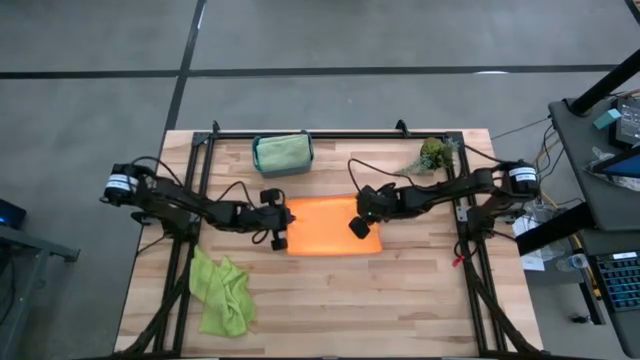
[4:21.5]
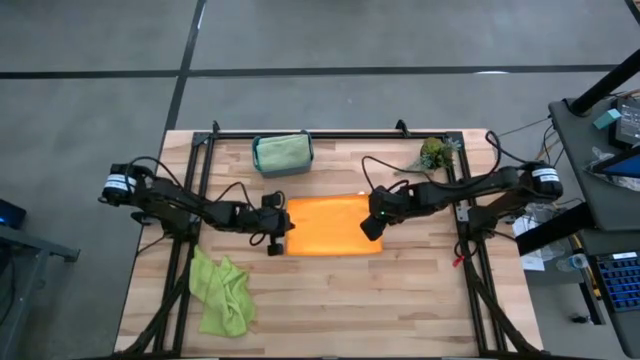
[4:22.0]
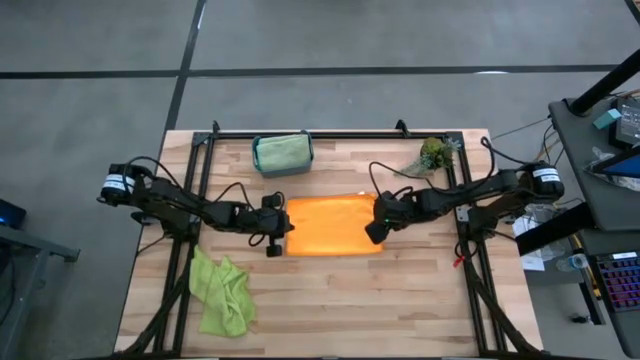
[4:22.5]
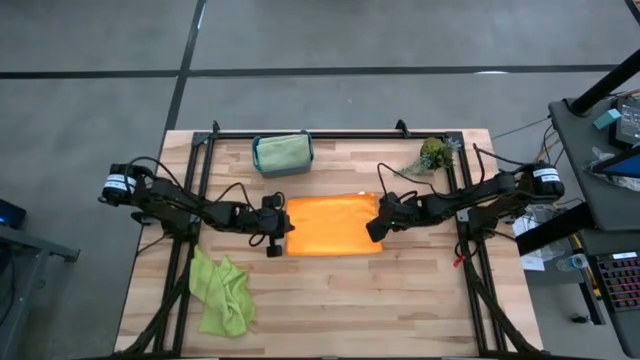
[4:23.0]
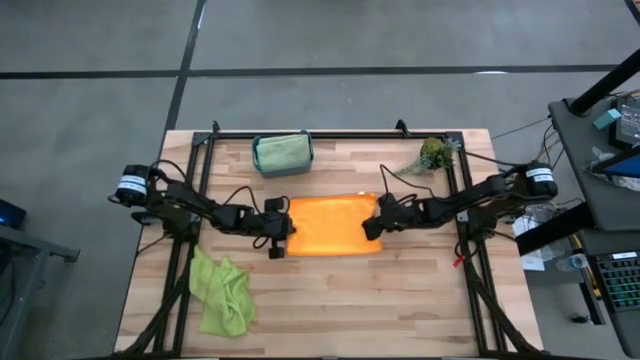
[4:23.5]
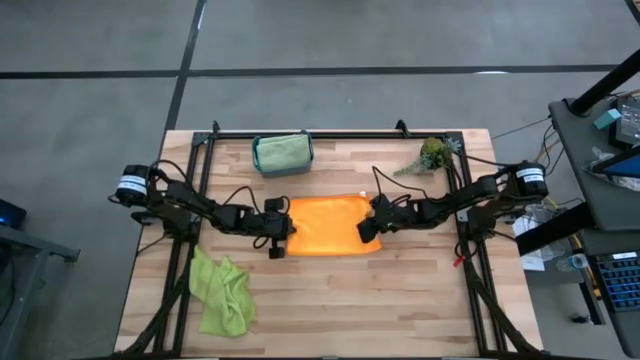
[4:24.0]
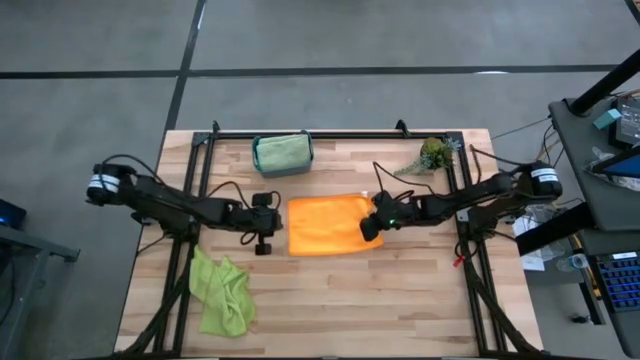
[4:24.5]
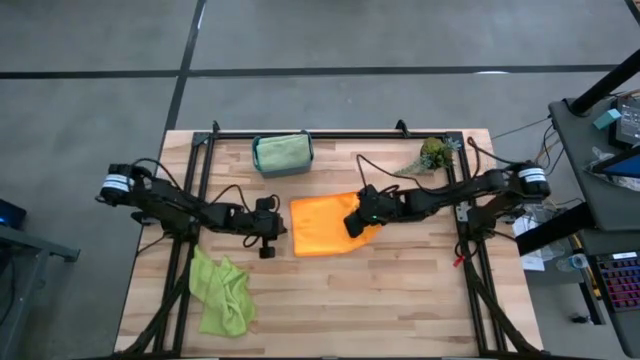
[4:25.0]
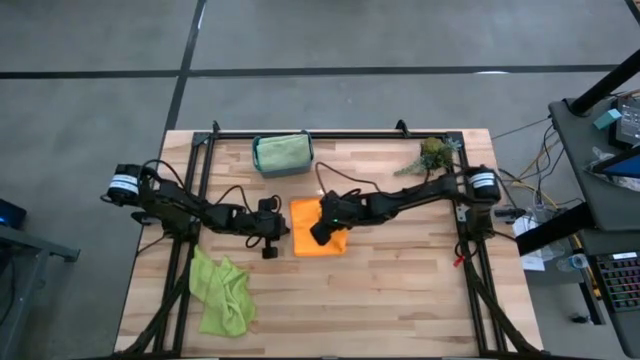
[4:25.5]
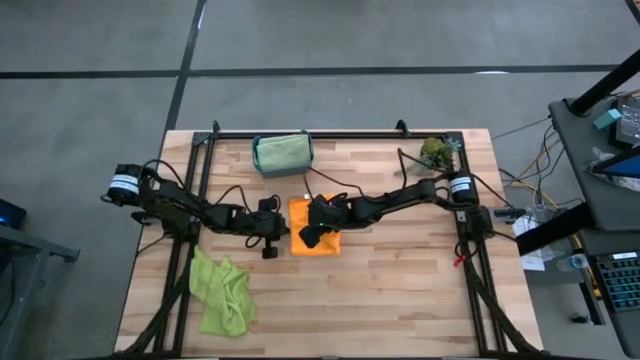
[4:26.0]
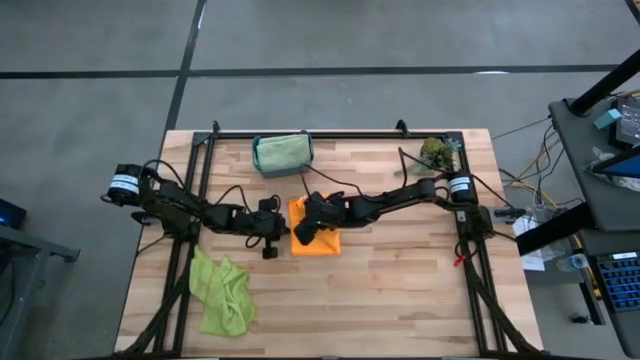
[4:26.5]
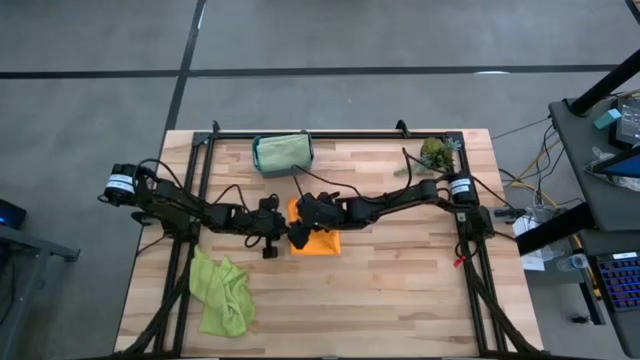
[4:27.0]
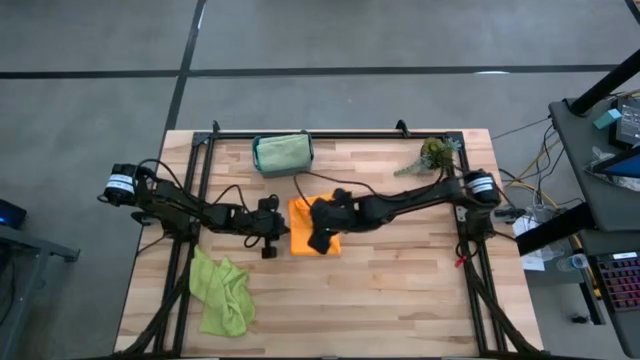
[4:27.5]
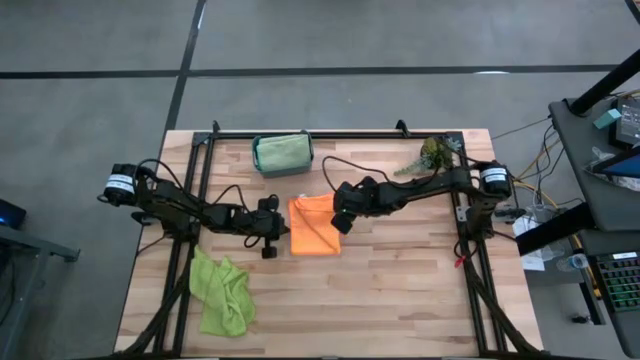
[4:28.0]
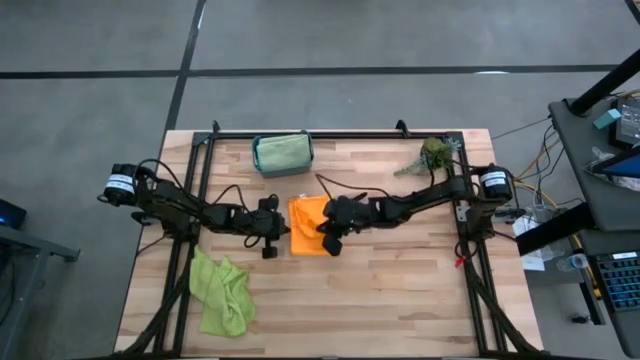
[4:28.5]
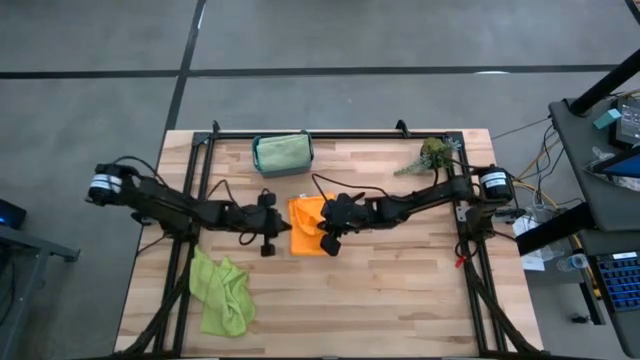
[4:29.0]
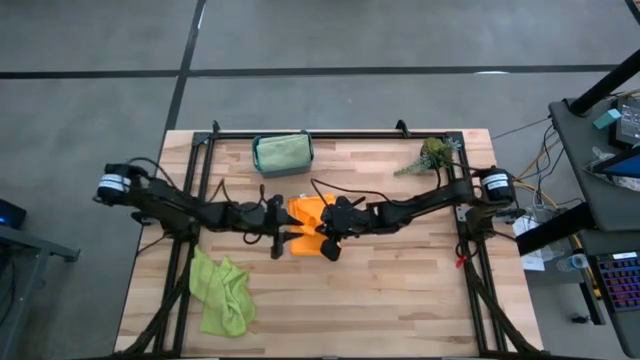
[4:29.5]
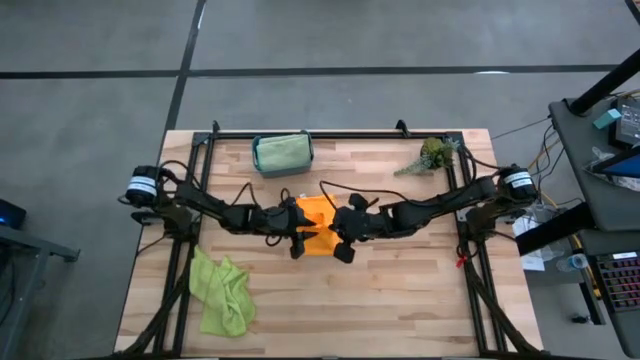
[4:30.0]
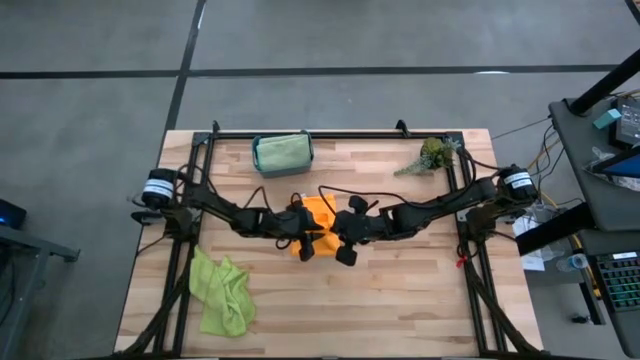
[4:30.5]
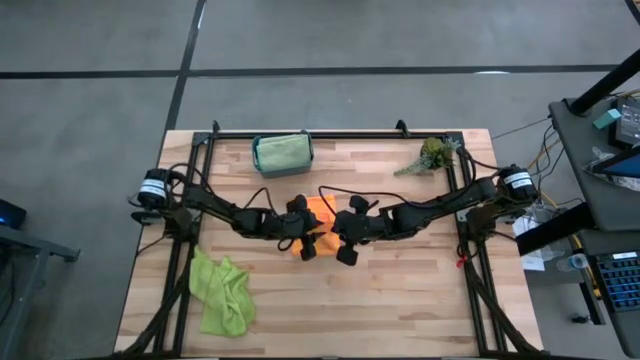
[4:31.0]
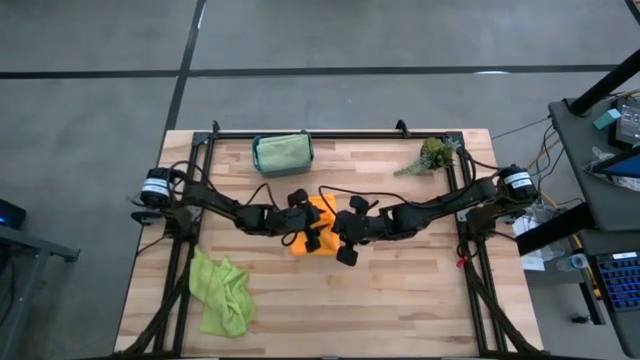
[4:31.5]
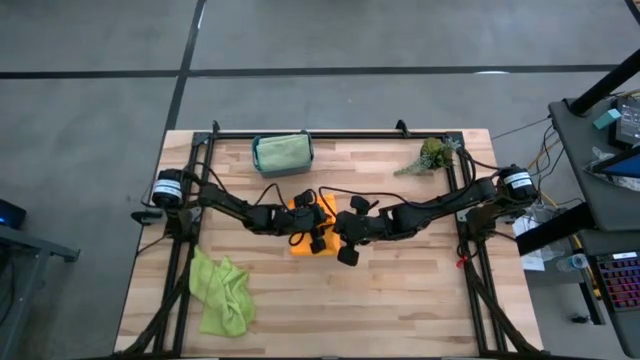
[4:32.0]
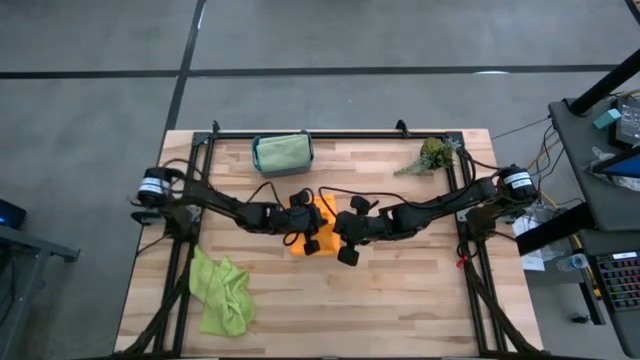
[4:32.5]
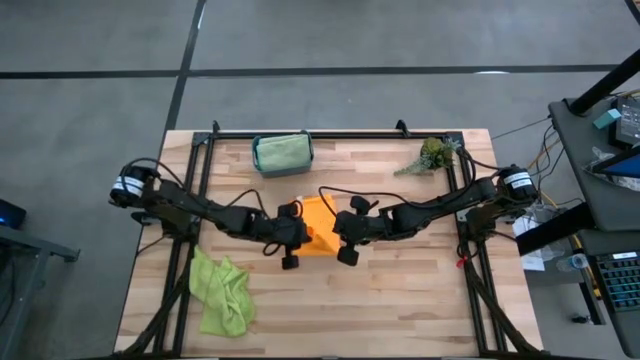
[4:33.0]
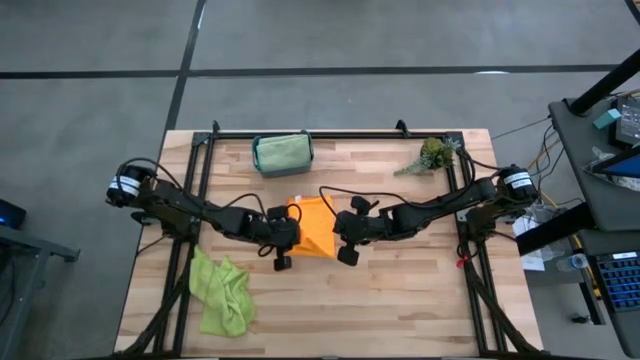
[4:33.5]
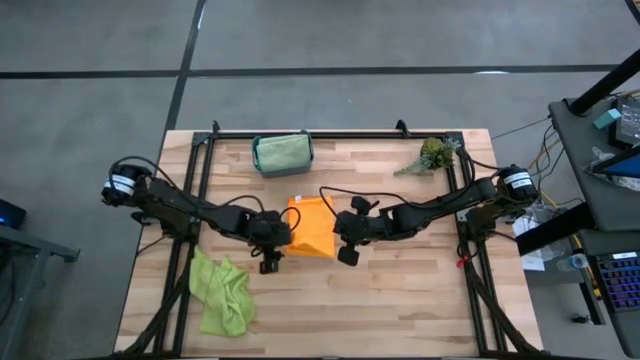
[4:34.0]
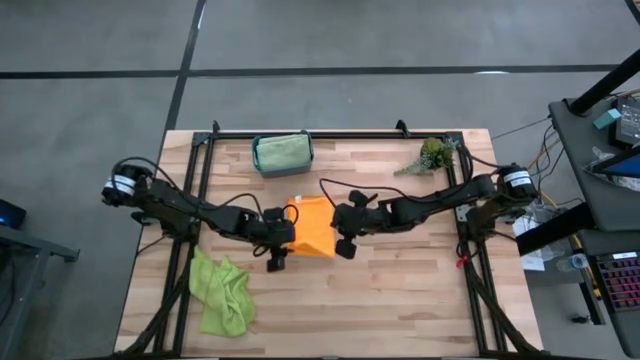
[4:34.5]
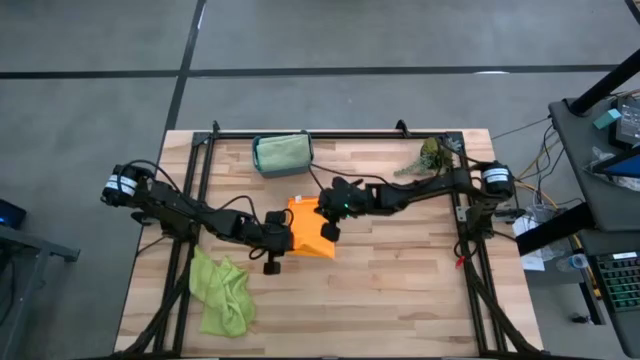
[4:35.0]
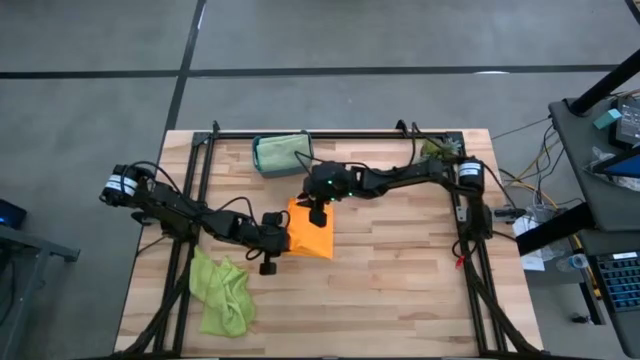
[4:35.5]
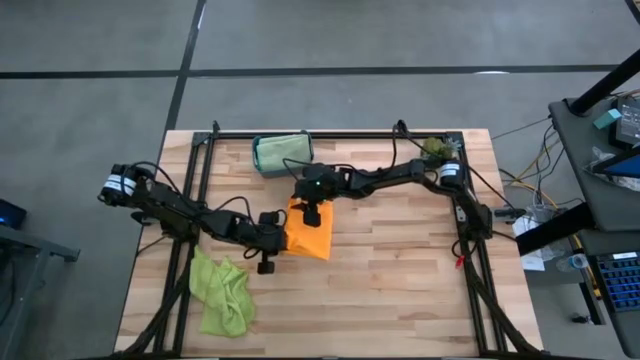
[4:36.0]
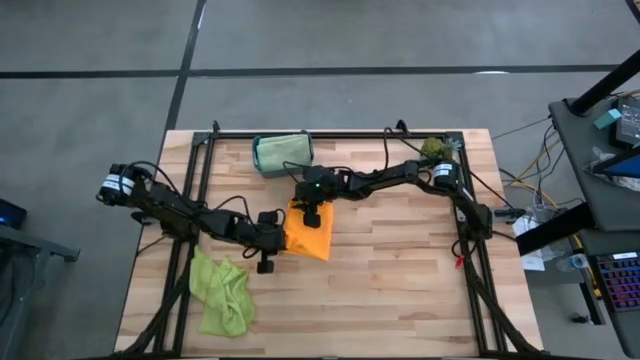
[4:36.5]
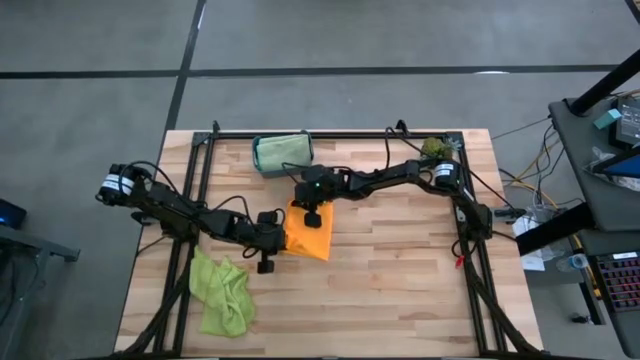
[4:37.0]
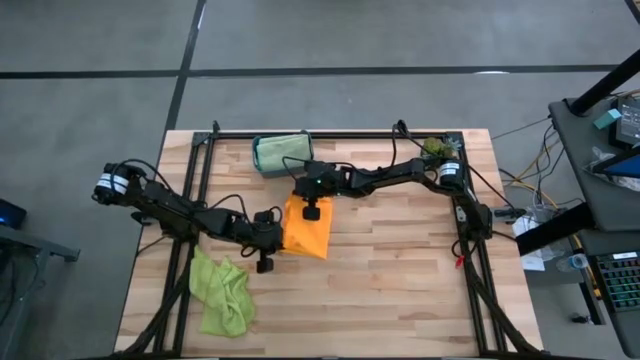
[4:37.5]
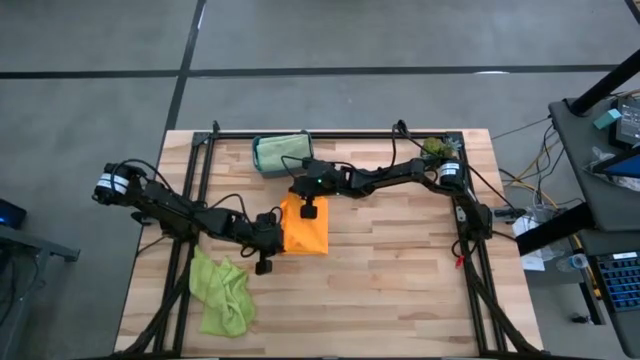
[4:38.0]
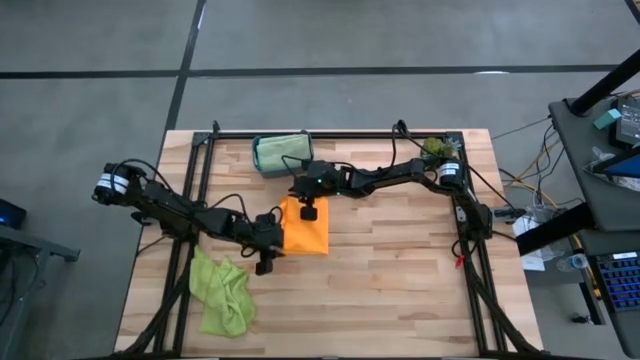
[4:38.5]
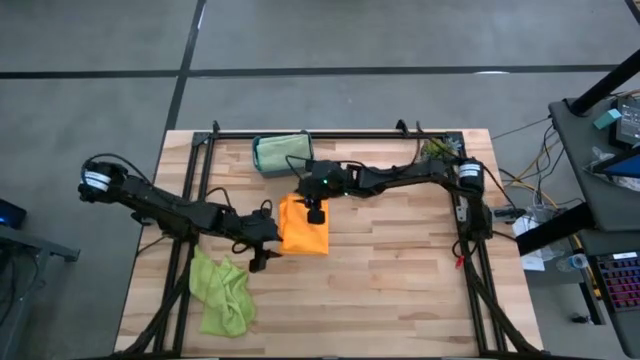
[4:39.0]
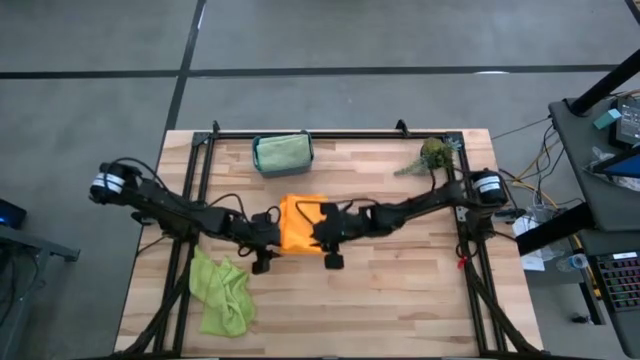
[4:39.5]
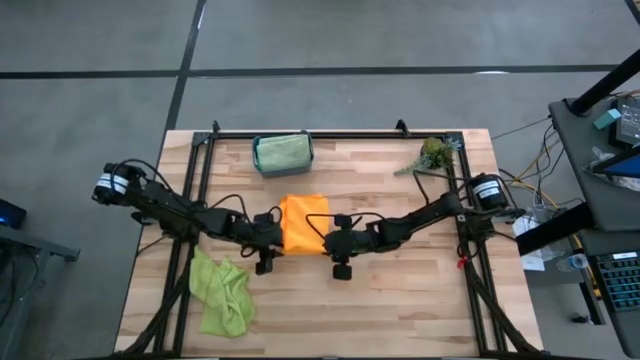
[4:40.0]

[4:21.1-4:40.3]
Task: Fold microfiber towels
Fold the orange microfiber towel

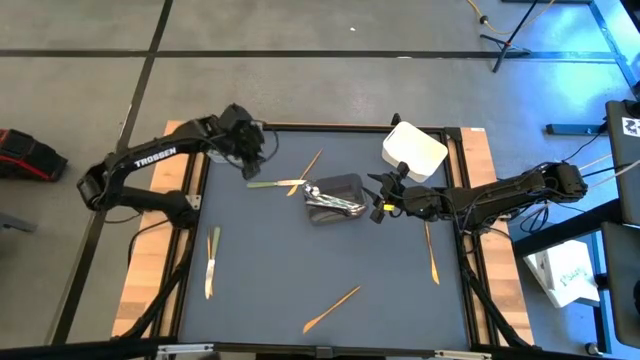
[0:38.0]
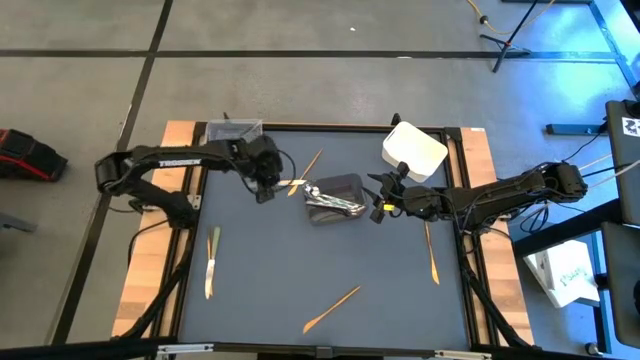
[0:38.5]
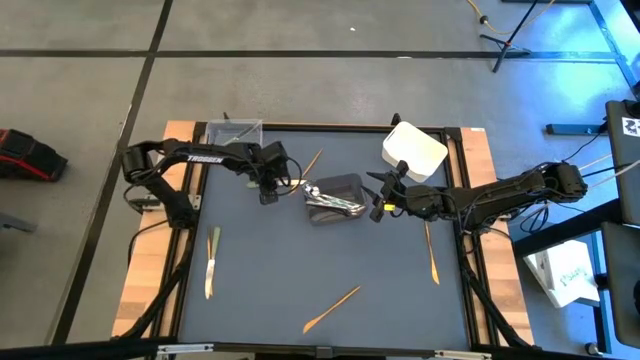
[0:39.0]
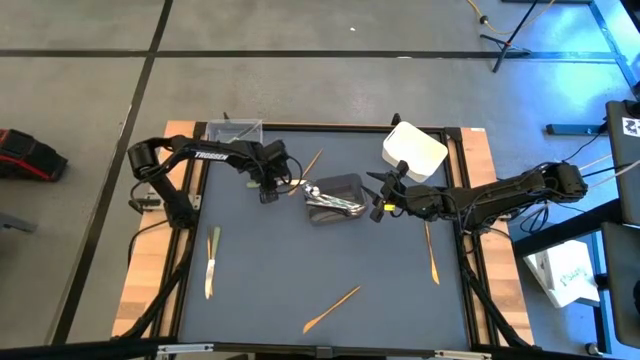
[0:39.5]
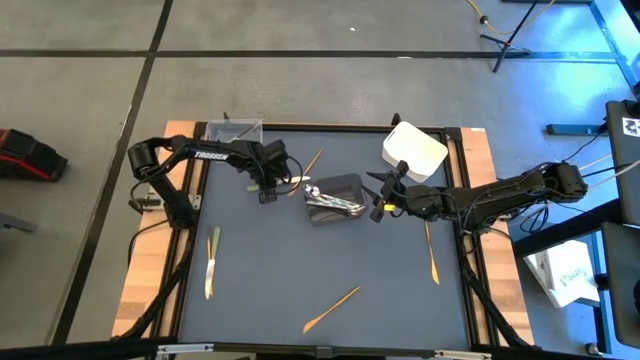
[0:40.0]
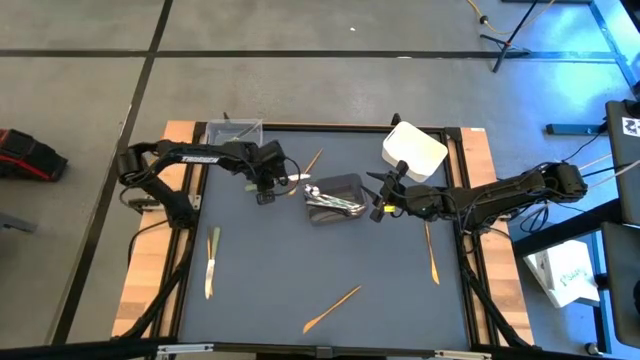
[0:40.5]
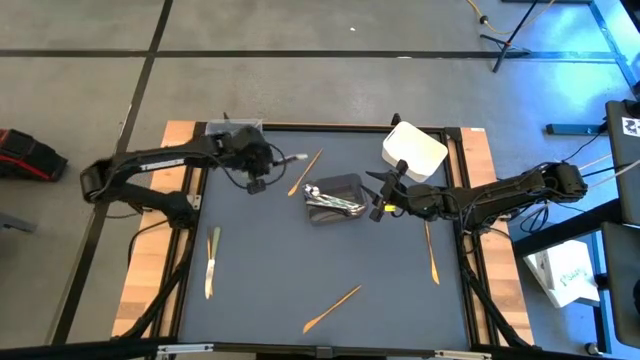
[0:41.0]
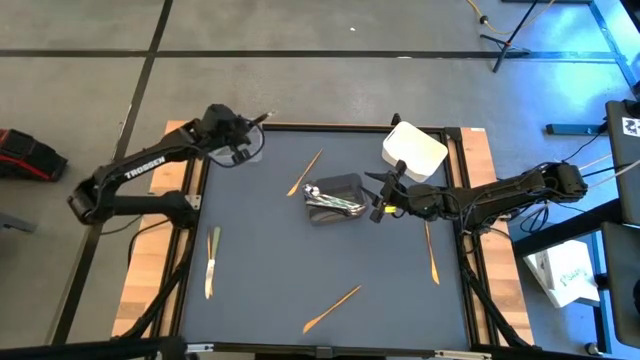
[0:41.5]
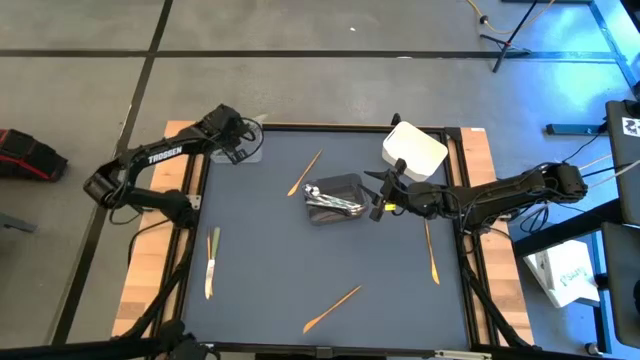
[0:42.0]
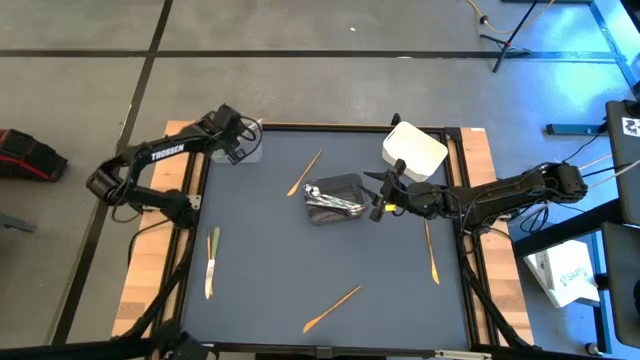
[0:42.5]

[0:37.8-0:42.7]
Task: Sort silverware by color (type)
Put the top green table knife into the transparent bin
